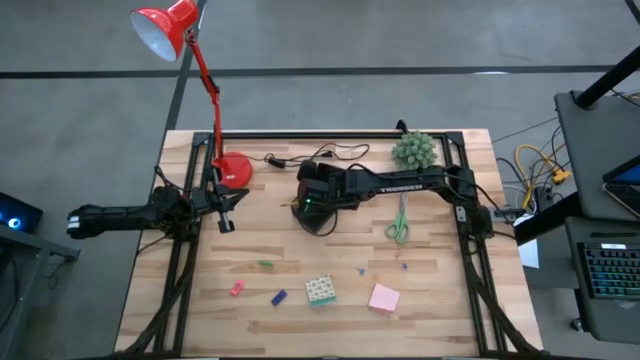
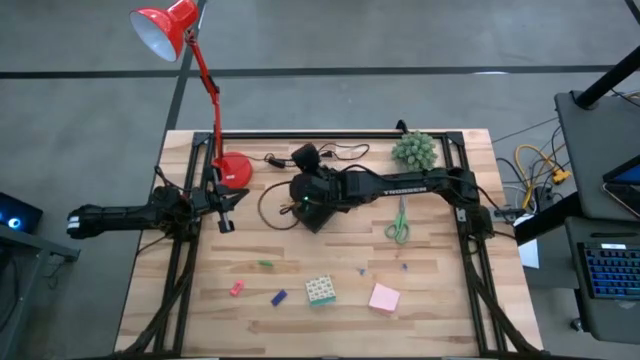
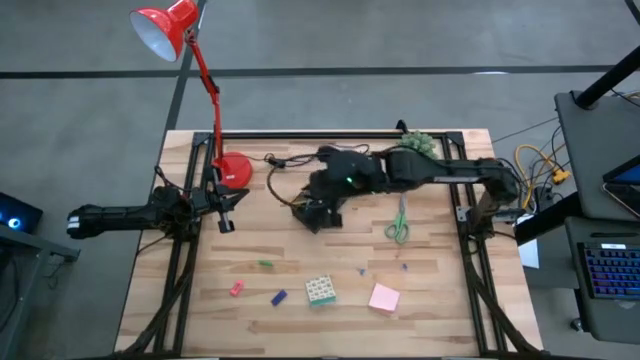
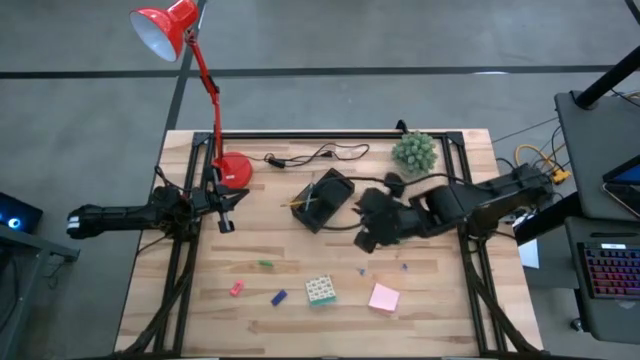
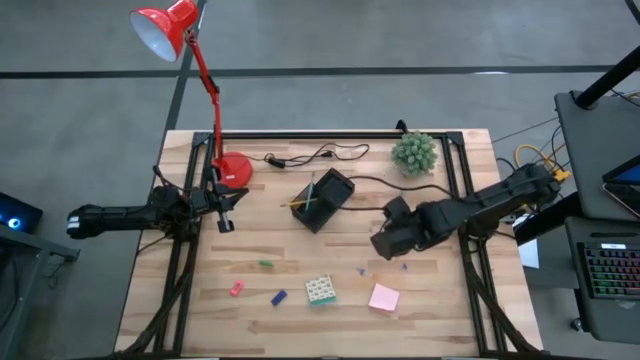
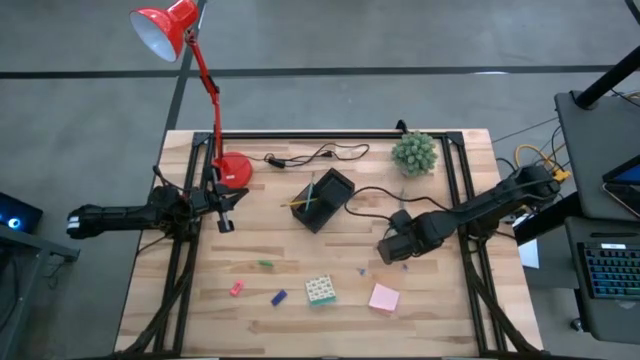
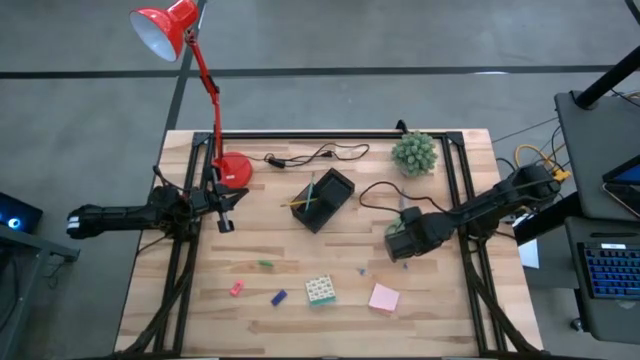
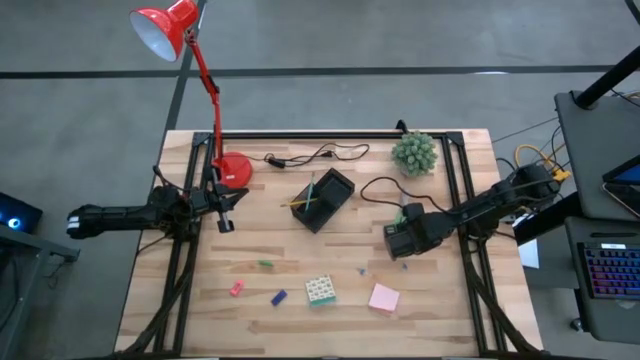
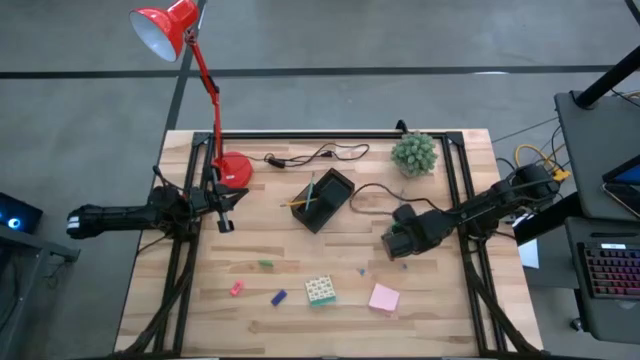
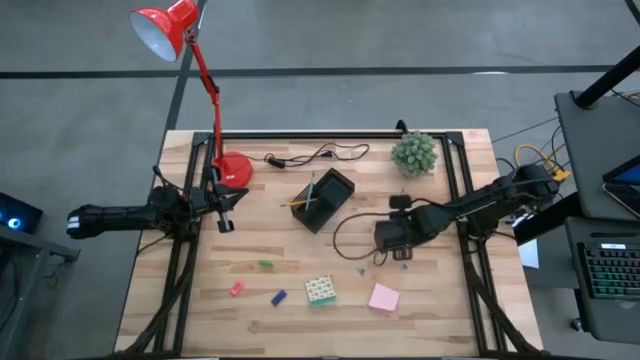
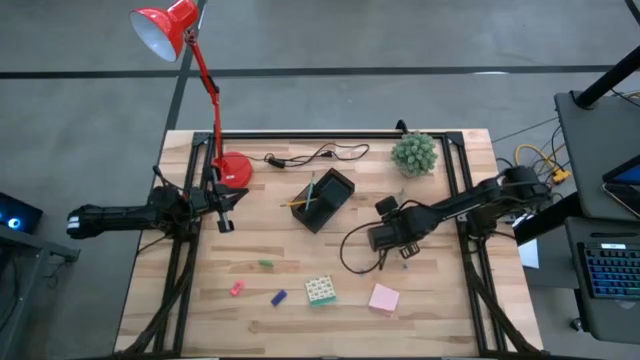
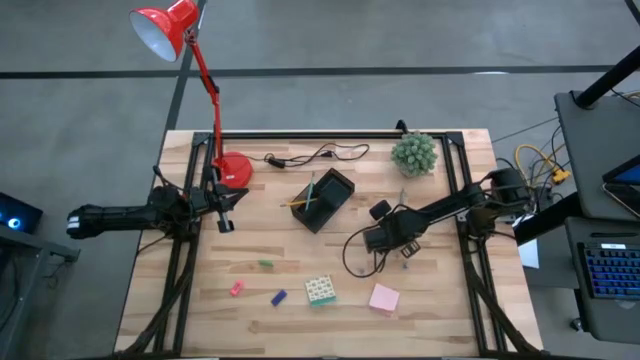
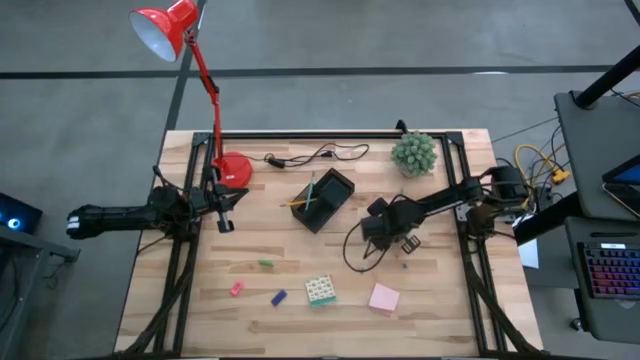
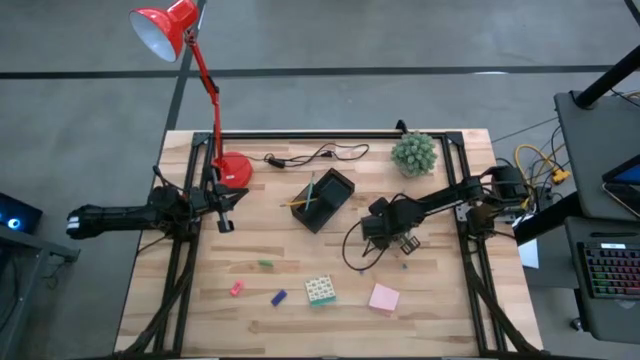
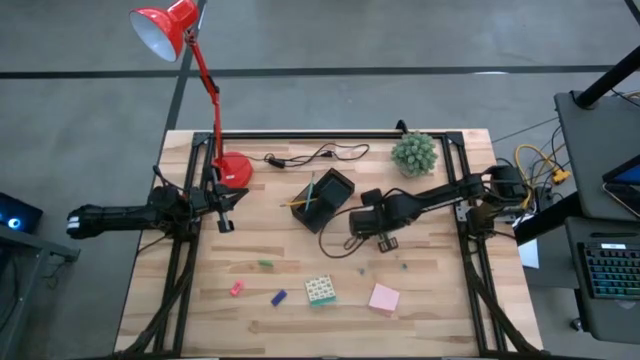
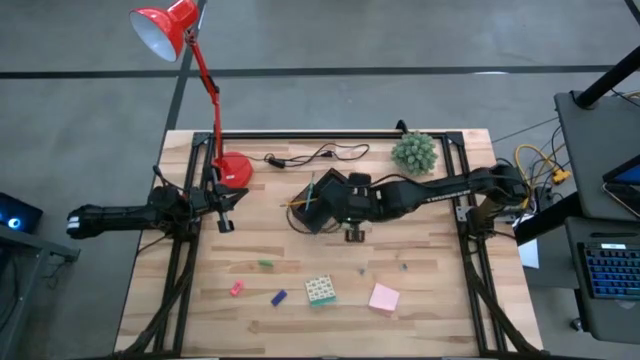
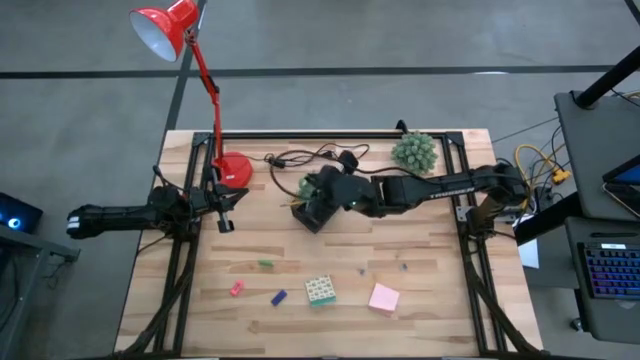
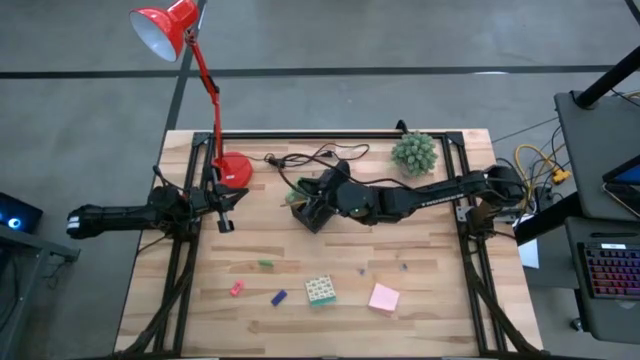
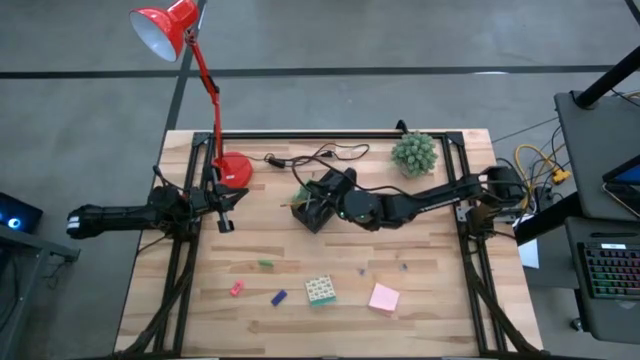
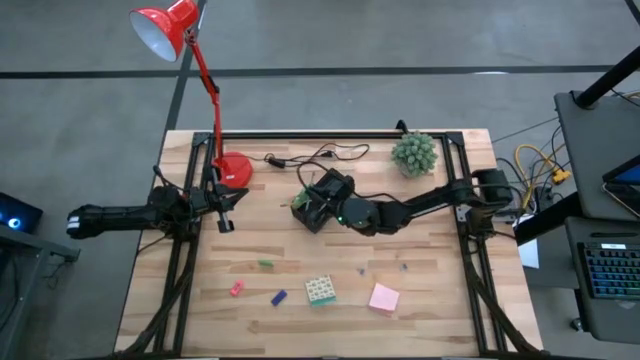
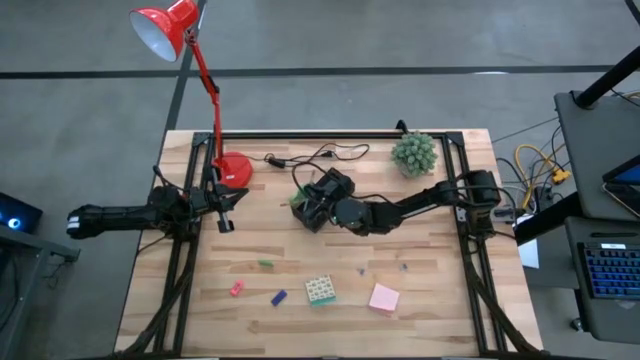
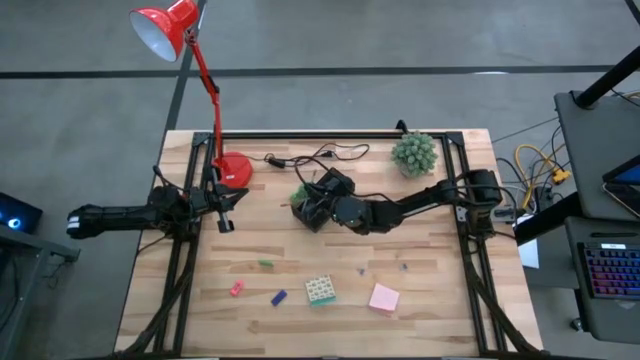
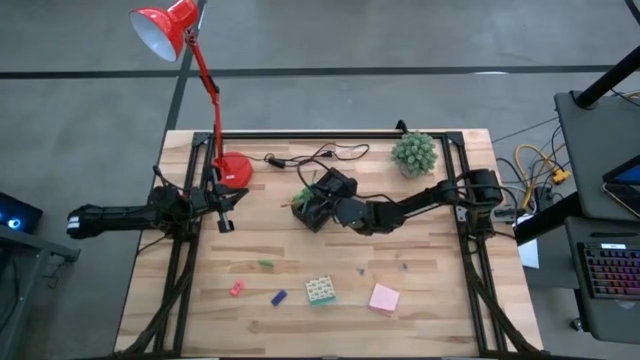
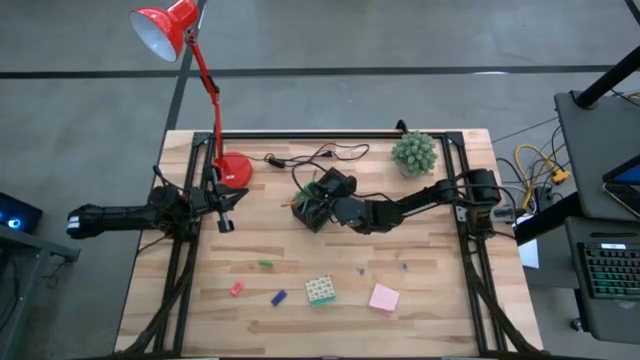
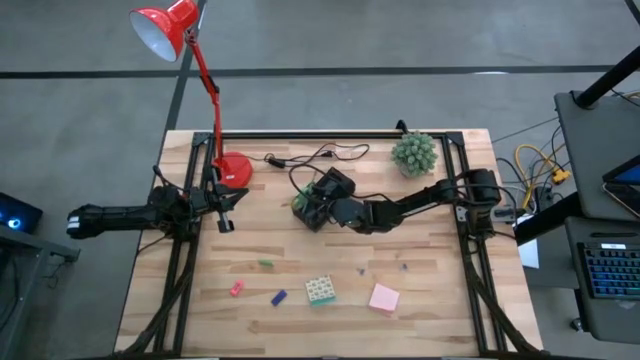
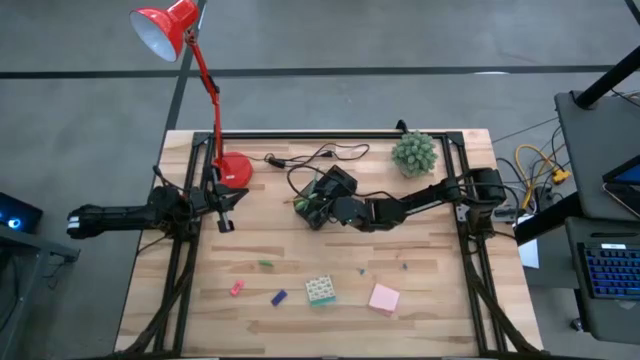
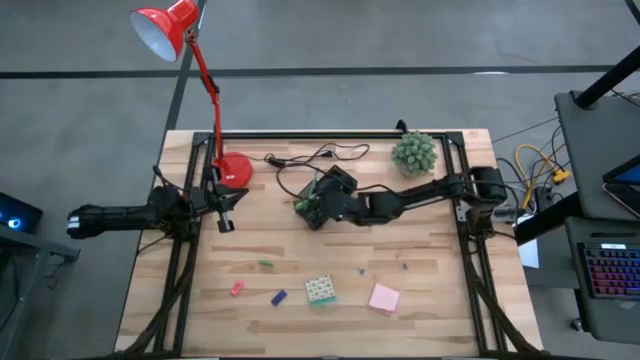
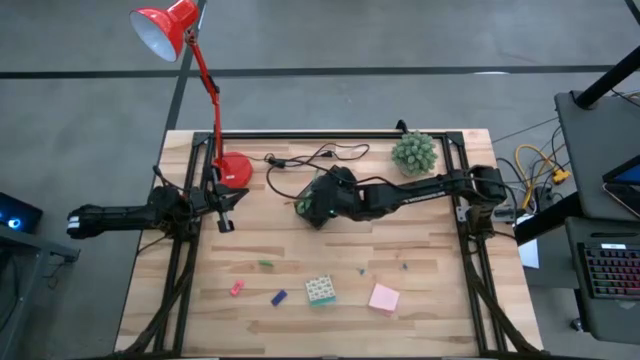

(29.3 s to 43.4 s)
Task: Pick and place office supplies into organizer
Put the green scissors into the black desk organizer

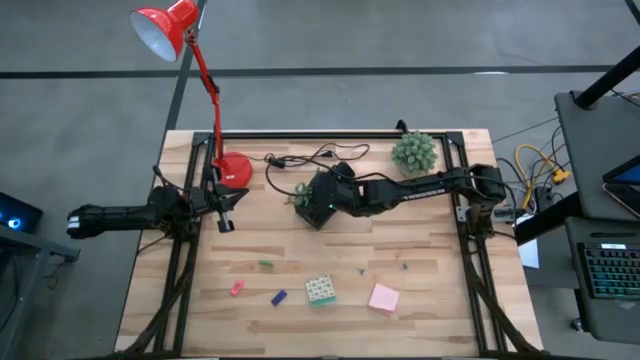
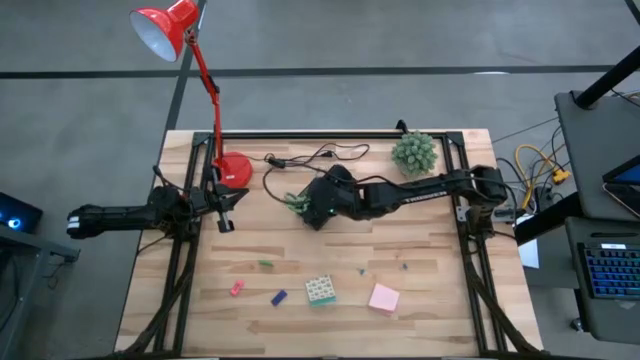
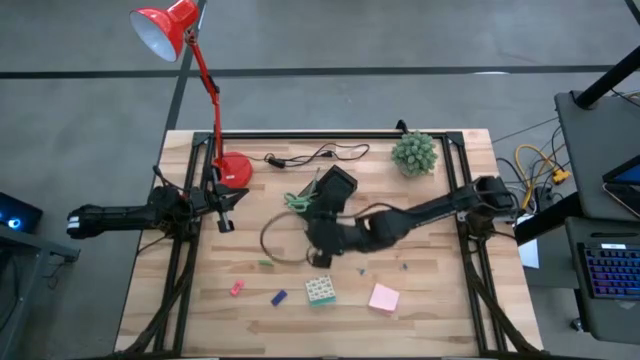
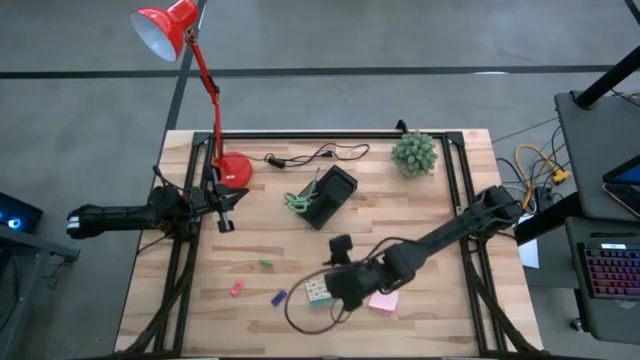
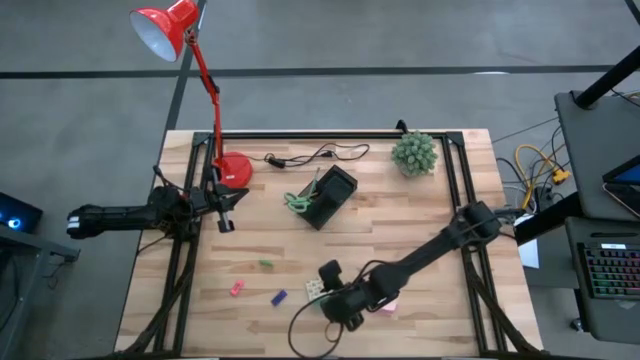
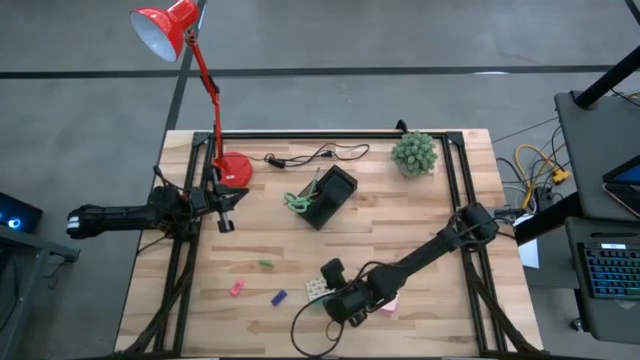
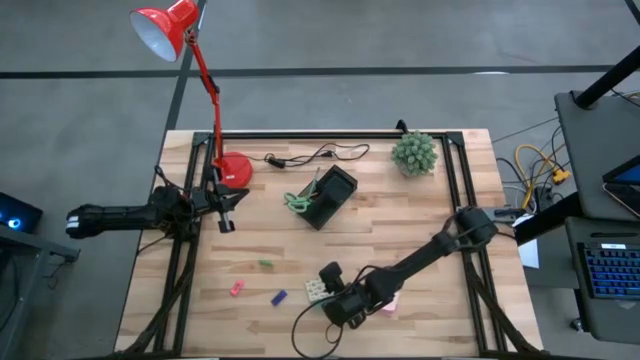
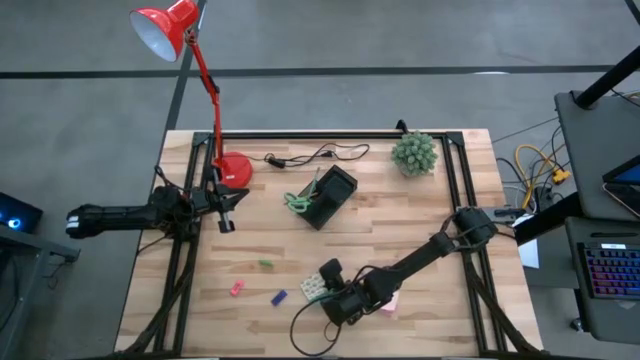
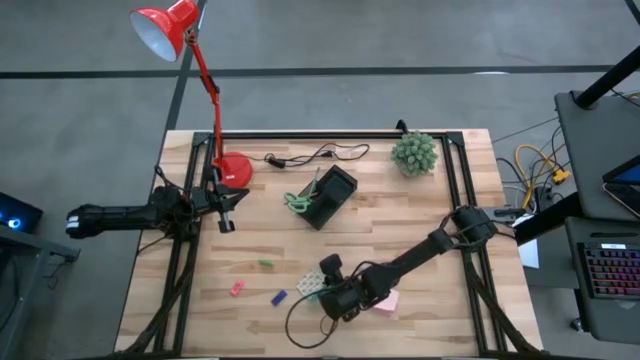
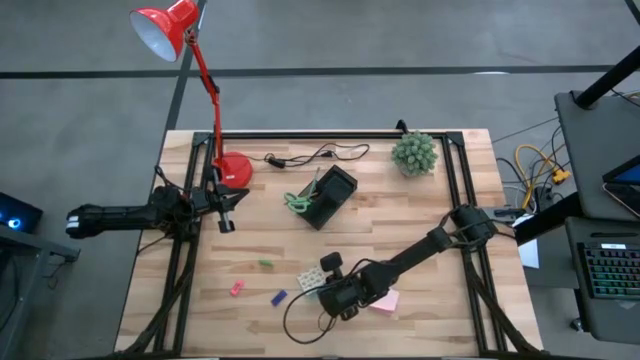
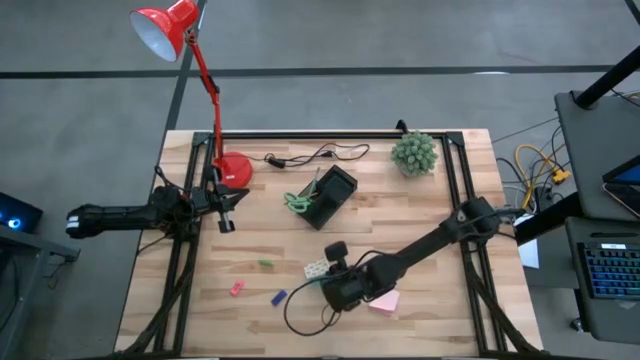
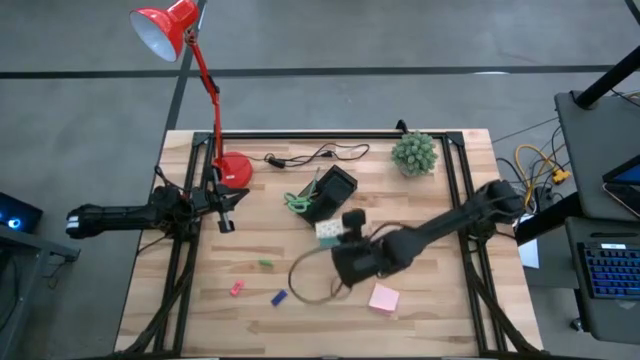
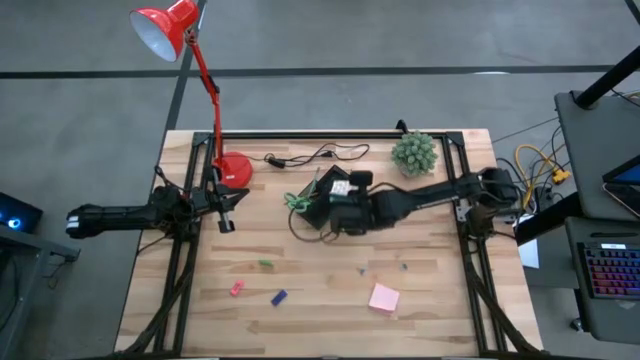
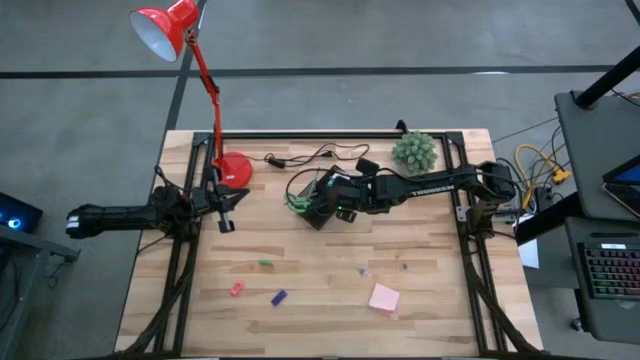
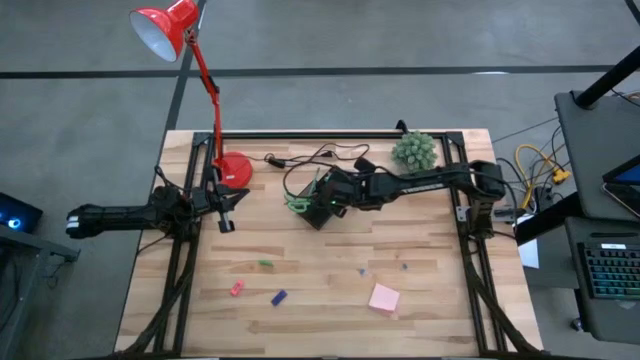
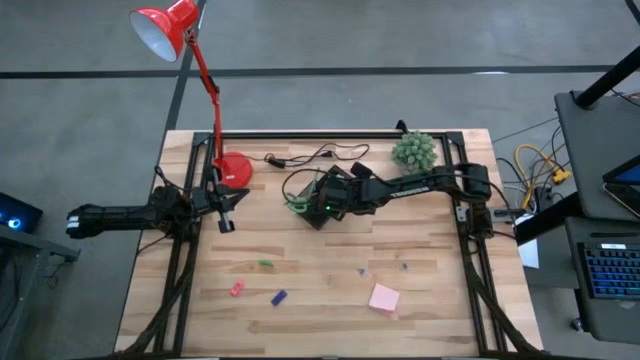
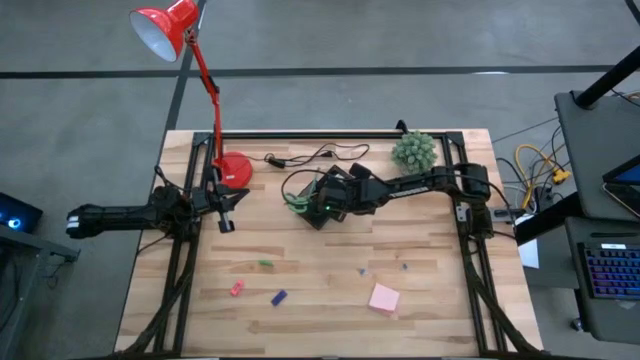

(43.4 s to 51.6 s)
Put the blue sticky notes into the black desk organizer
